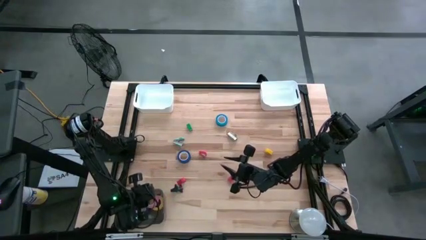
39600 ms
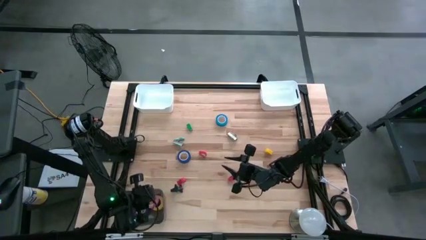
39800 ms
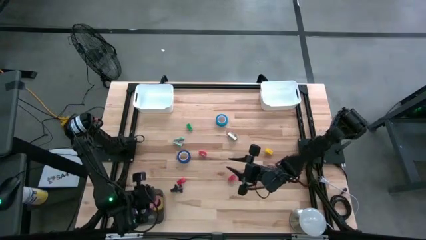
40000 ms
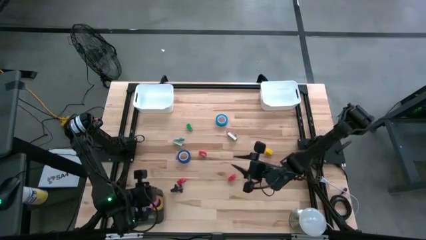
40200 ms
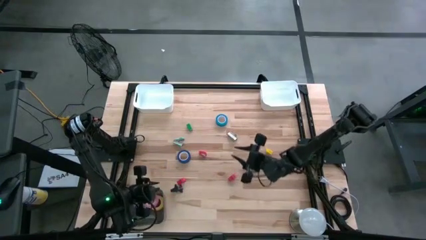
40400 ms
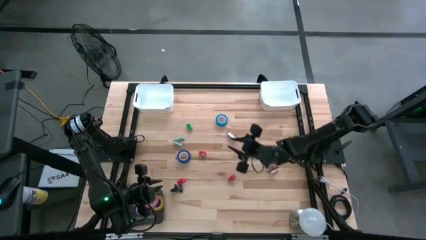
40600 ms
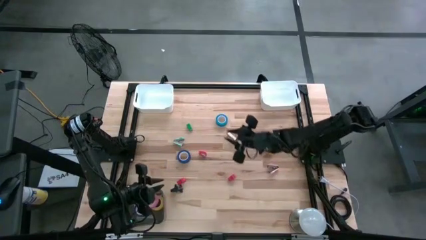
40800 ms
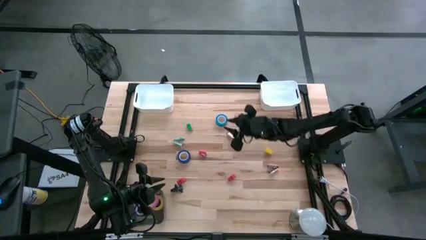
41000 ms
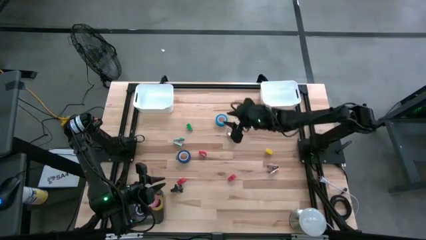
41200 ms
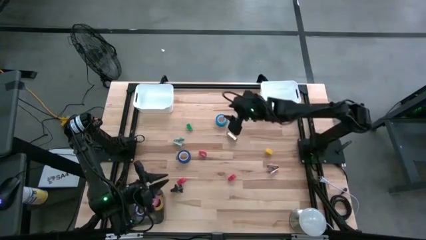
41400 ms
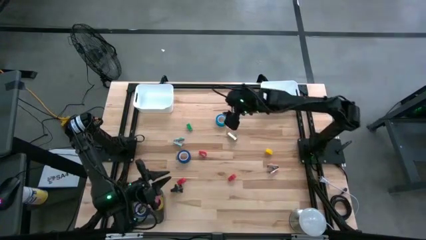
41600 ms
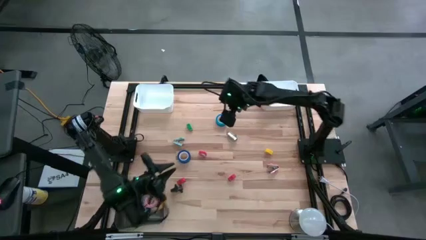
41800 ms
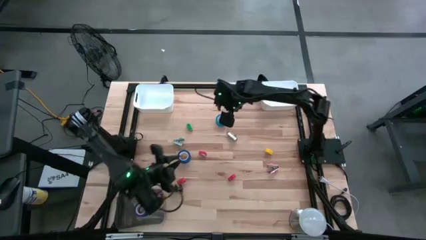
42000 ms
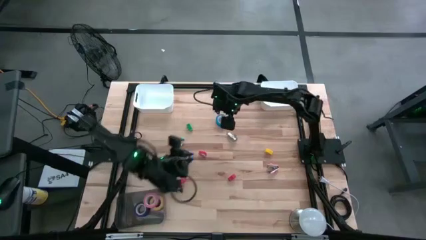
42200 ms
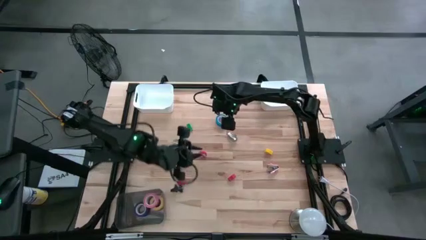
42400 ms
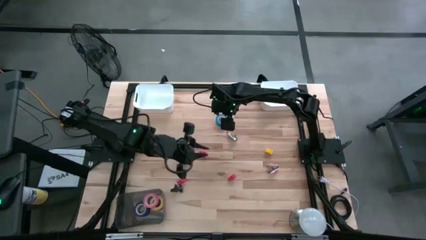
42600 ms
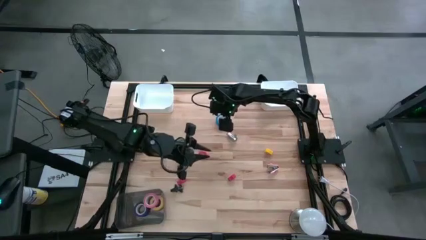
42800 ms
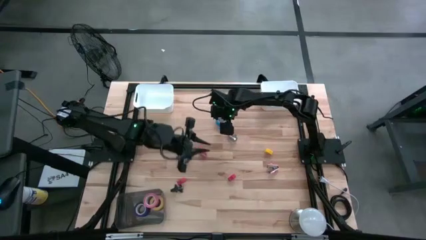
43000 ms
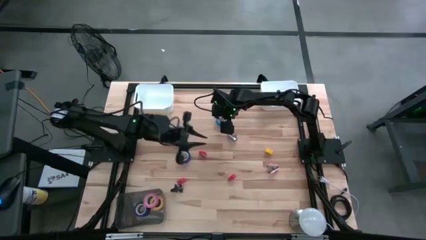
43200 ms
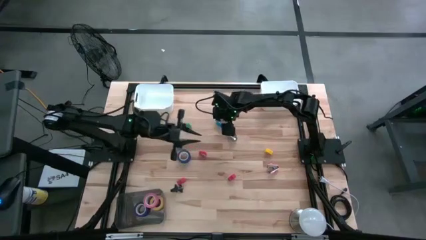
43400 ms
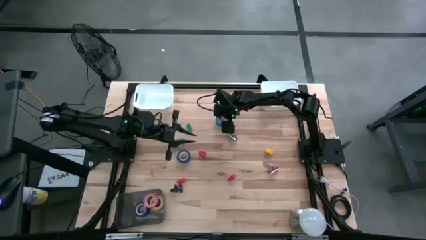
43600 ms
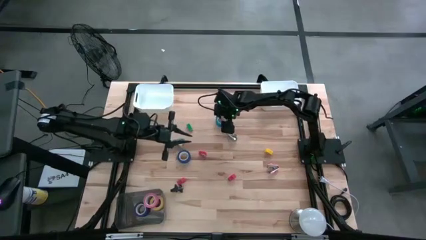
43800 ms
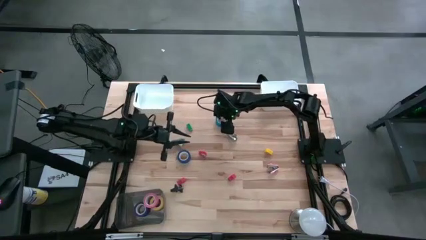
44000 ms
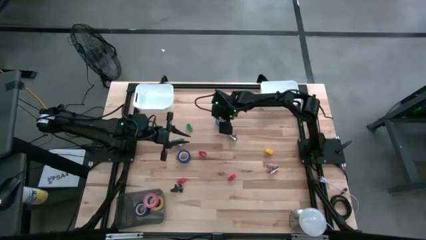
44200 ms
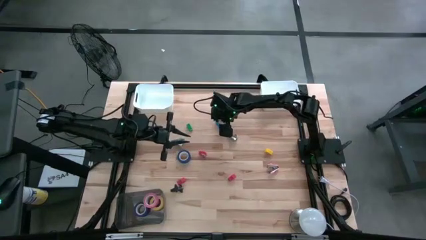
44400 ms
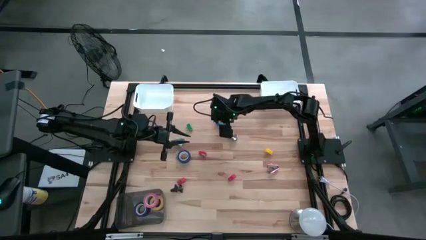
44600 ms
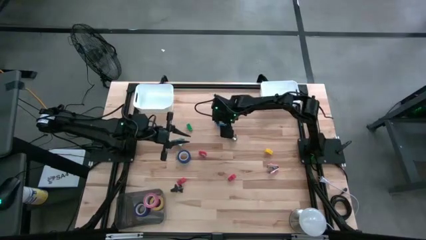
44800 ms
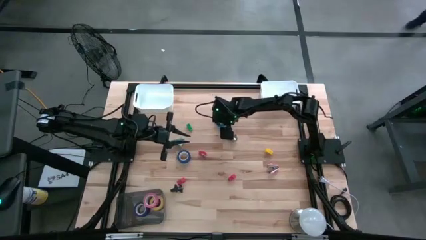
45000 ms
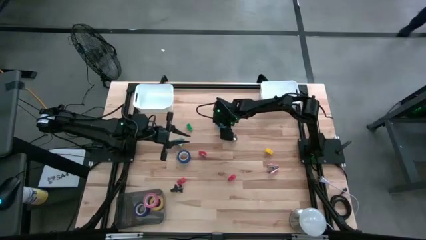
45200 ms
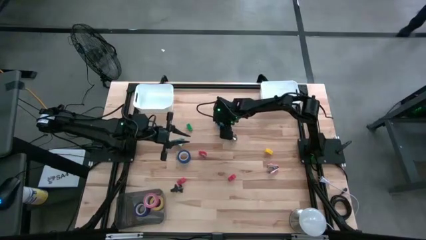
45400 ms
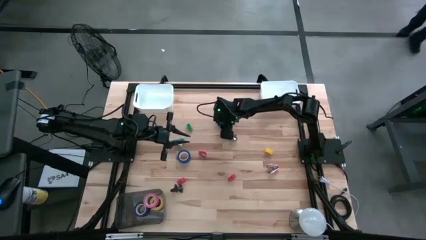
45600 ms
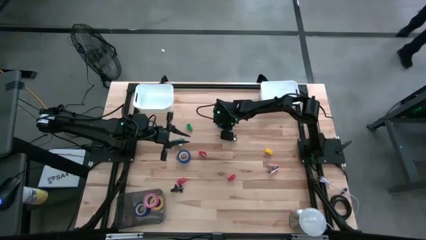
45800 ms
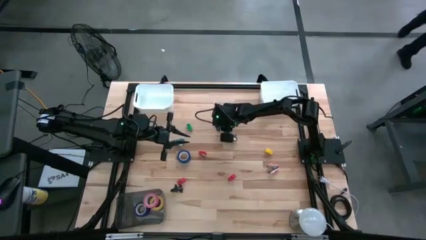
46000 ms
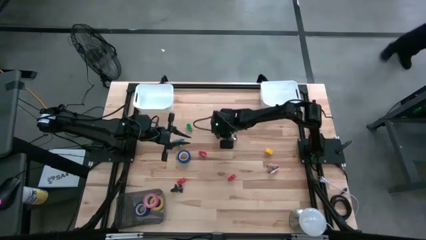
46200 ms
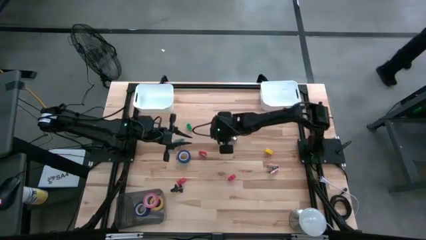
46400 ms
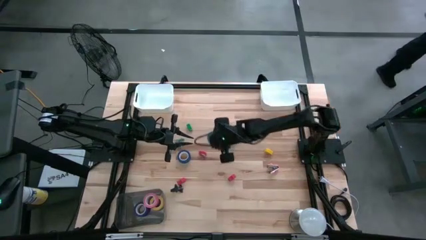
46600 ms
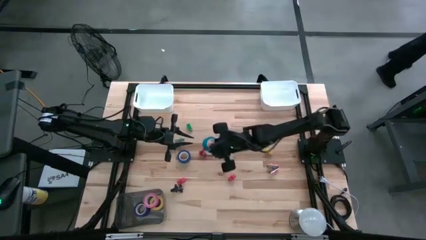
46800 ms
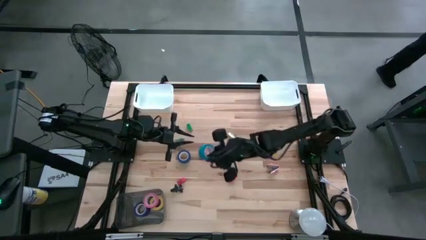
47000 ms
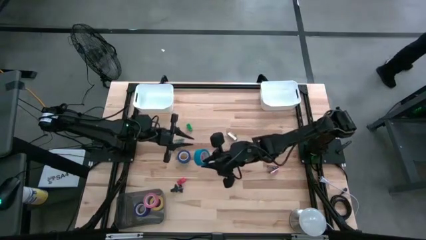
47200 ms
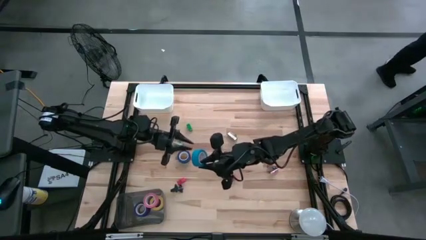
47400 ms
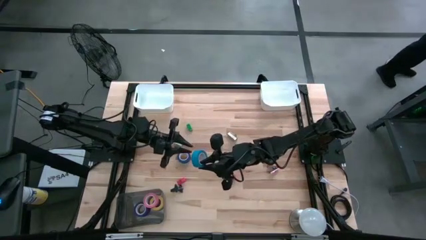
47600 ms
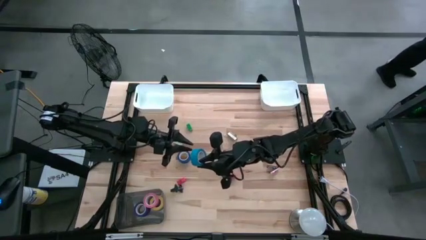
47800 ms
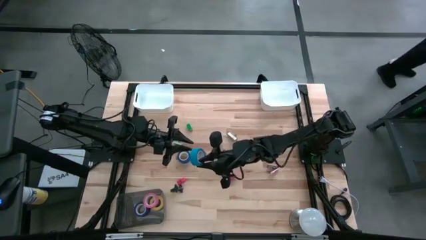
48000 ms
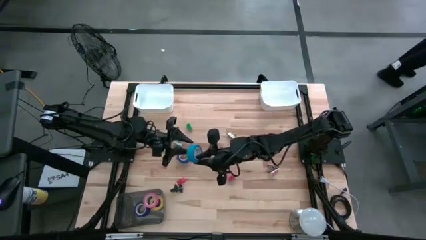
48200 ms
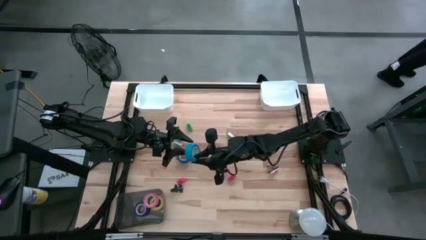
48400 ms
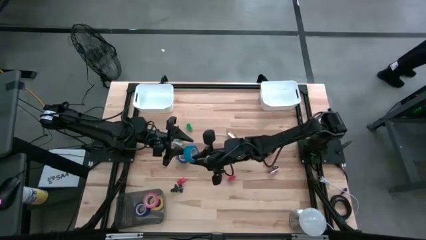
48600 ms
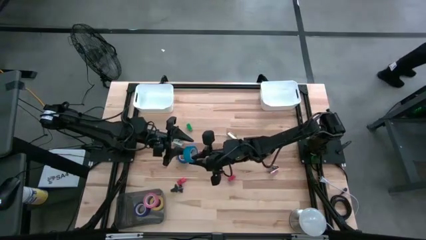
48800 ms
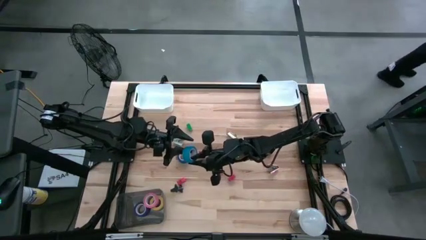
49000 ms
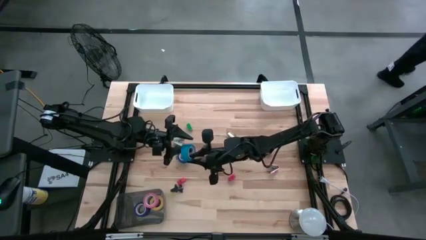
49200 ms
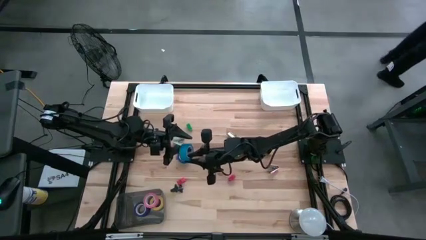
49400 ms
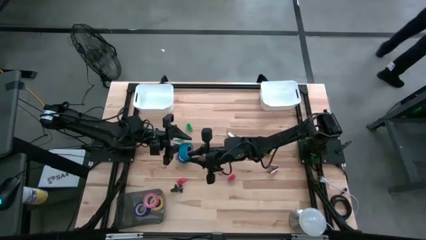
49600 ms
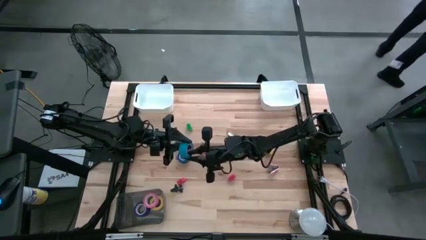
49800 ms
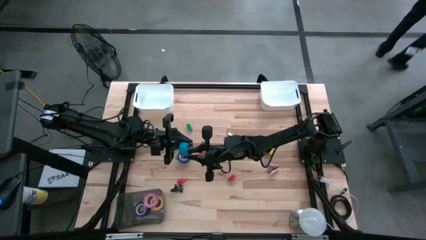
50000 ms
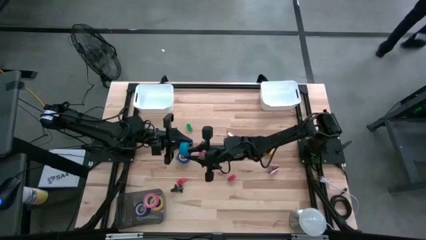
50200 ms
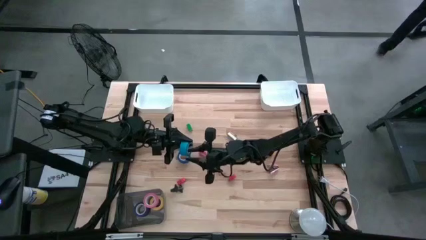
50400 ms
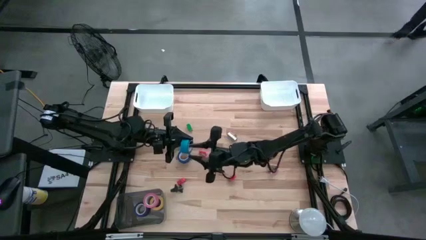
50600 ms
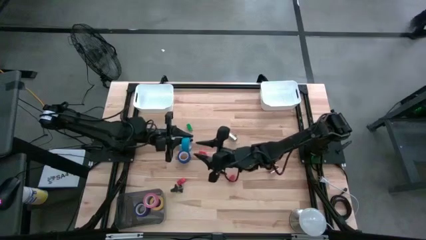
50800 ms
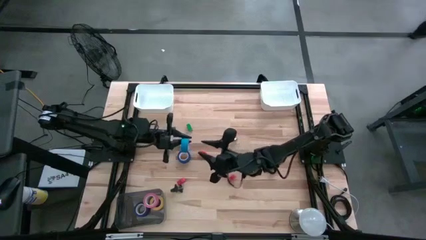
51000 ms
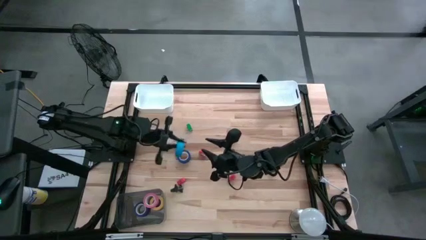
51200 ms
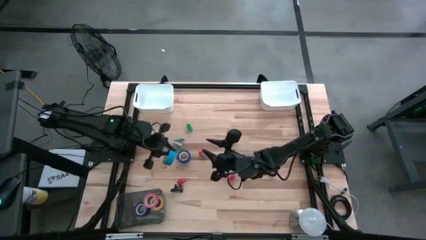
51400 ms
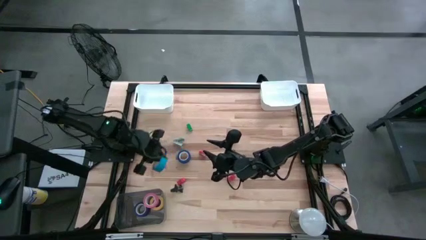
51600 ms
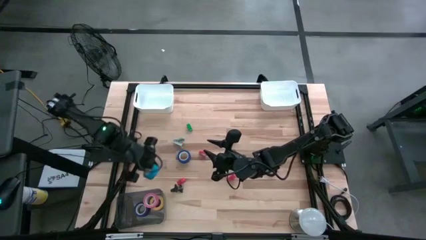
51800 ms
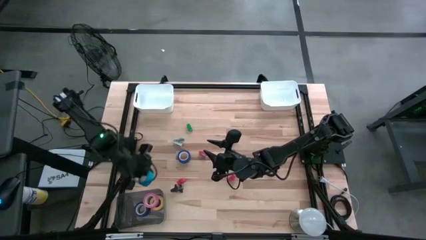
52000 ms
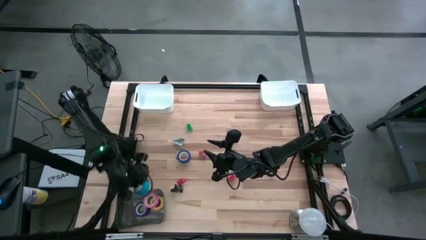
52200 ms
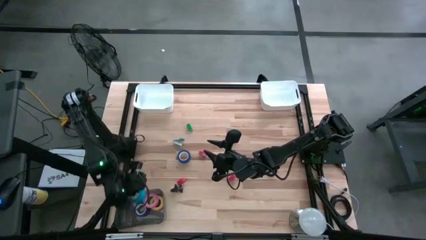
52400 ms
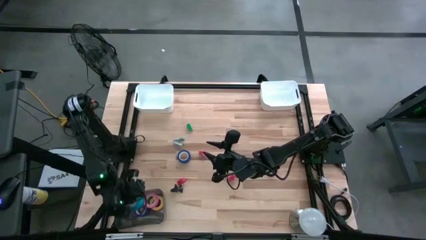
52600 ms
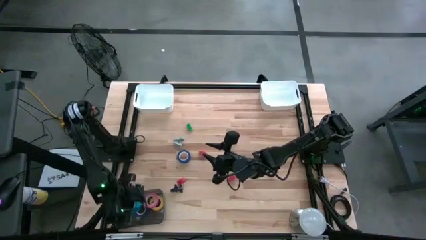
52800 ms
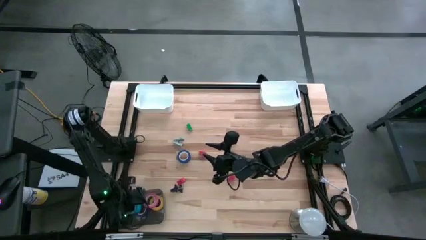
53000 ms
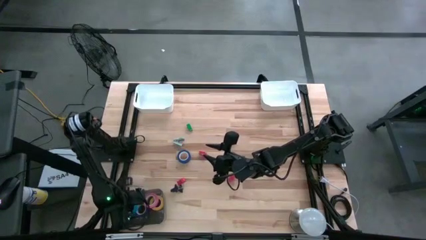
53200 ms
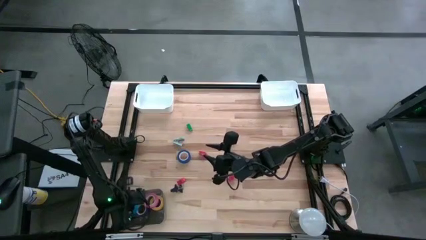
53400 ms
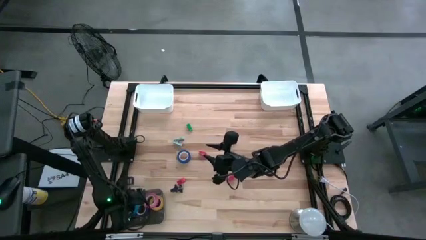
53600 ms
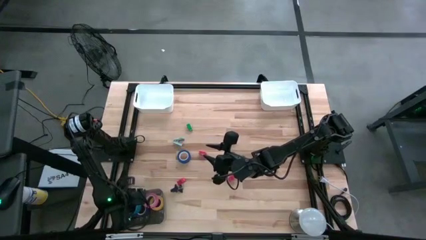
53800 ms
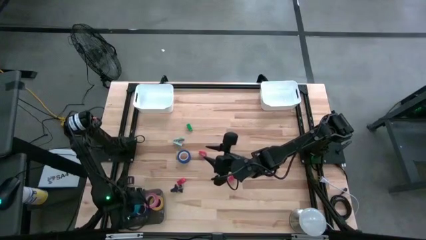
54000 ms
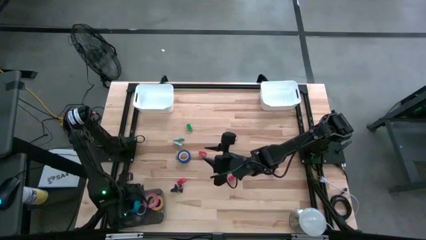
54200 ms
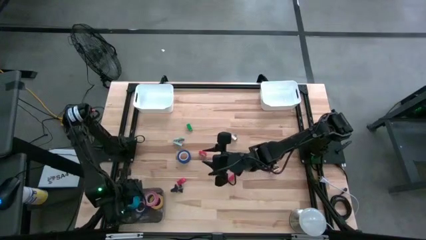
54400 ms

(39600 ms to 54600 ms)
Task: Pick and place Stapler, Stapler remover, tape
Put the light blue tape into the black bin
